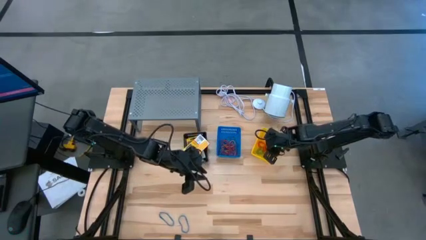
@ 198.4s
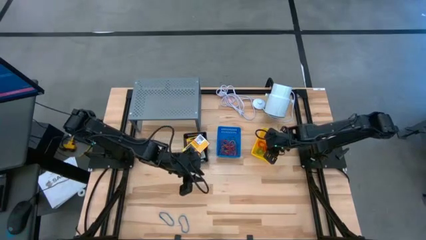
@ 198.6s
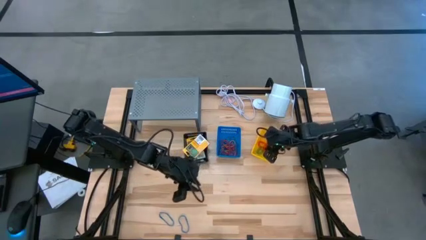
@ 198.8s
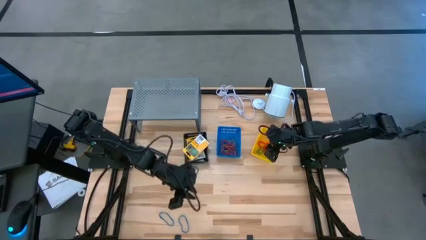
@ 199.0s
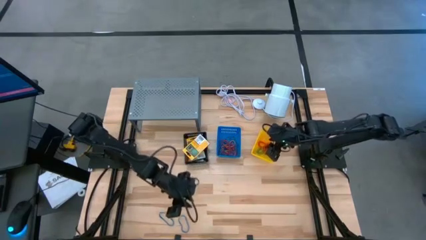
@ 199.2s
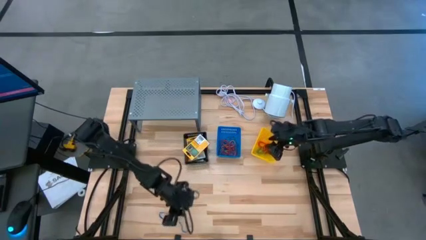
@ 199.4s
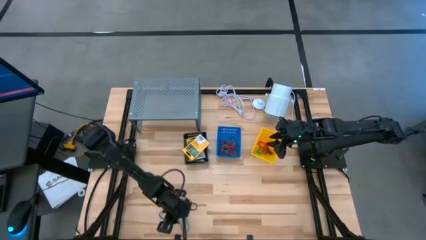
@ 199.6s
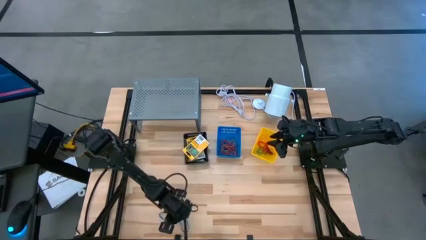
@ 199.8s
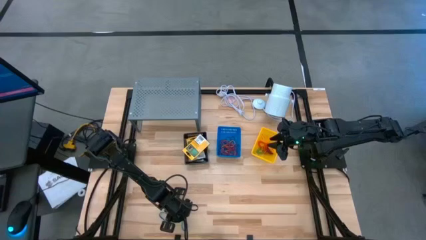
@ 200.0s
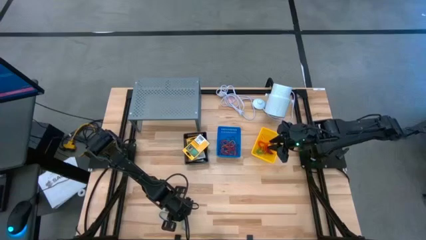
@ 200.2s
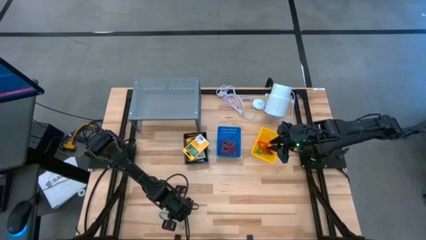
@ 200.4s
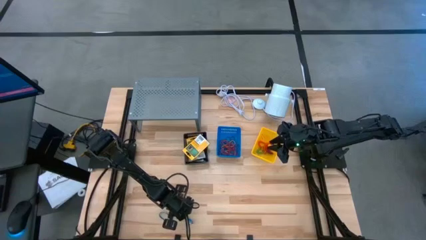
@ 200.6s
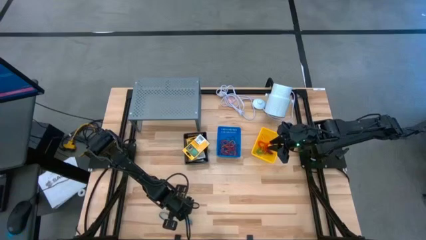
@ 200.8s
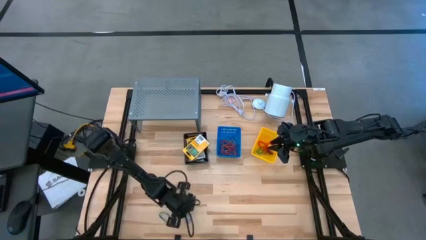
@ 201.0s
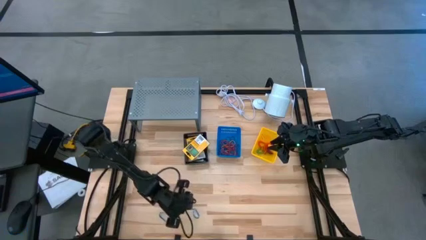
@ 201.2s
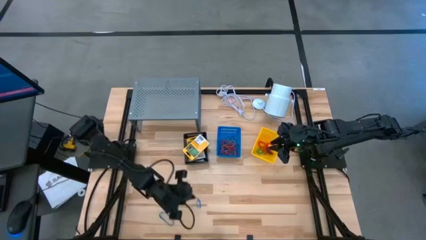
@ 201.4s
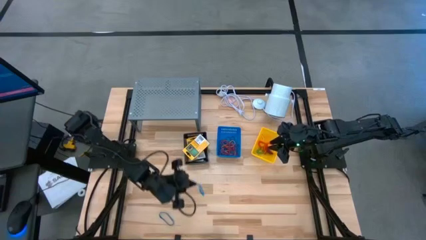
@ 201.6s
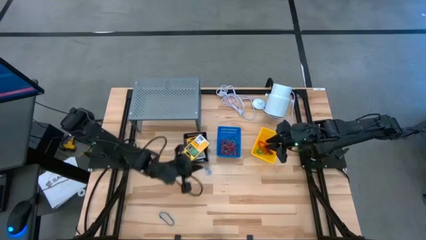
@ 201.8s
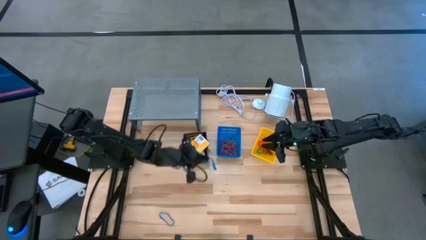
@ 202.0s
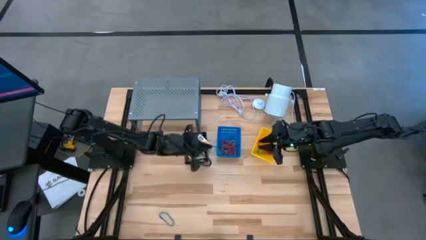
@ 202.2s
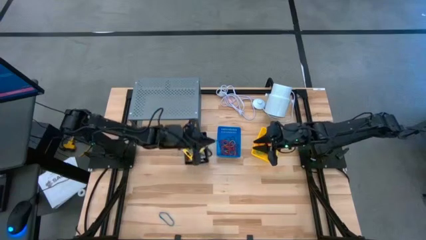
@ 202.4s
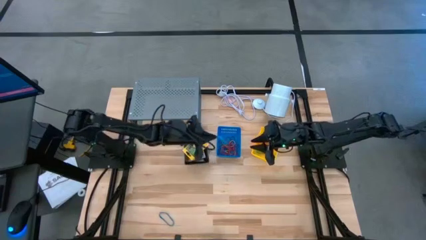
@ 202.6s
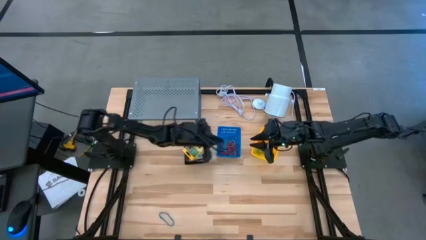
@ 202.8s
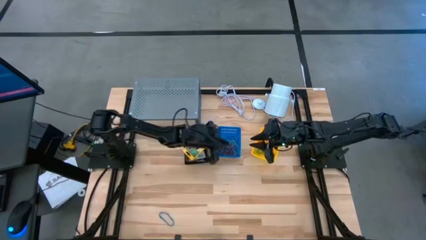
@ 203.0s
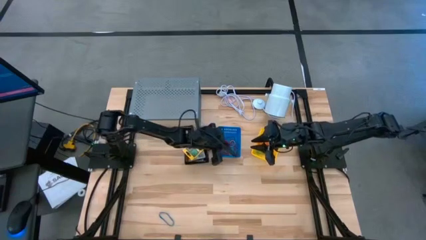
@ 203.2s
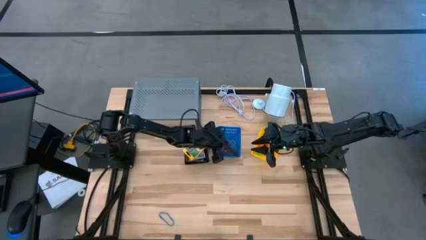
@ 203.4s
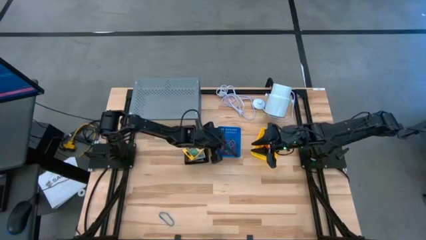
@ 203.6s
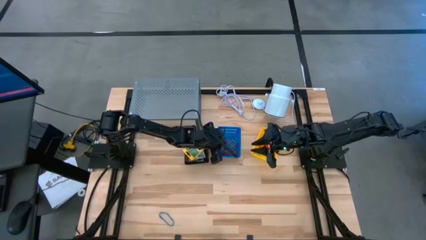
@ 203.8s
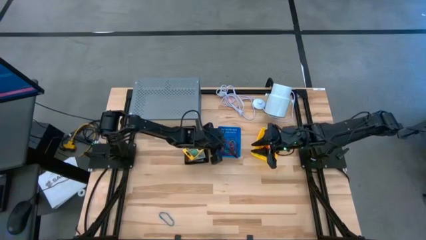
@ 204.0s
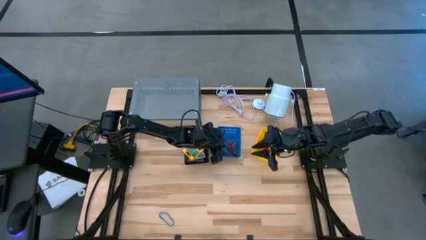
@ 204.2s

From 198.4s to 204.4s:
Task: Pick & Place Office Desk Supplies
Put the blue rubber band into the blue basket

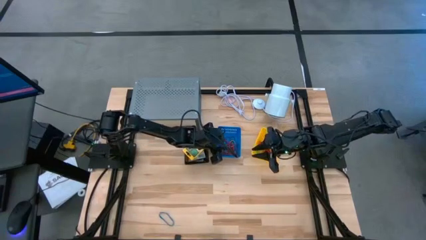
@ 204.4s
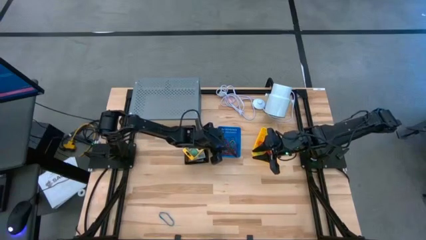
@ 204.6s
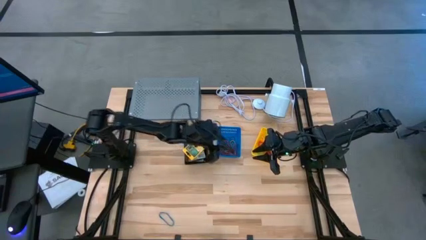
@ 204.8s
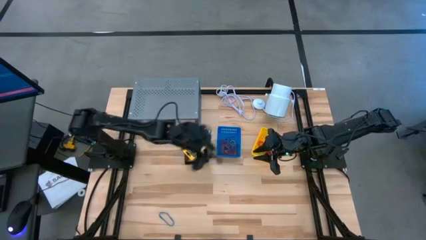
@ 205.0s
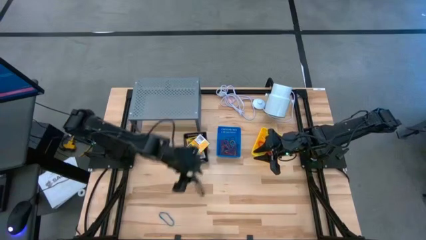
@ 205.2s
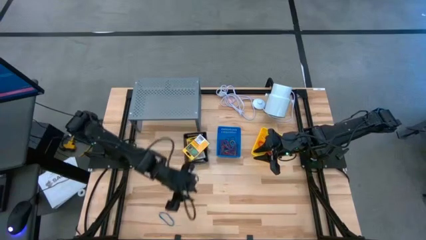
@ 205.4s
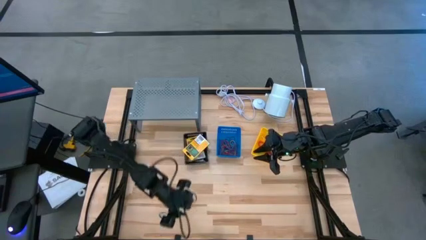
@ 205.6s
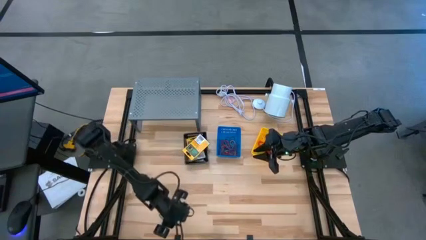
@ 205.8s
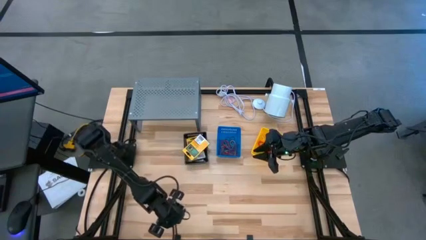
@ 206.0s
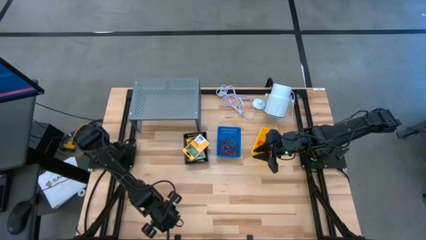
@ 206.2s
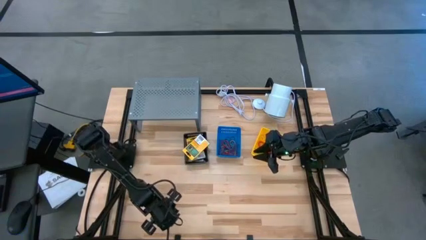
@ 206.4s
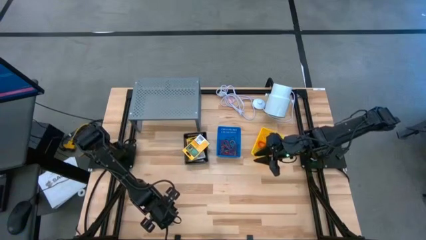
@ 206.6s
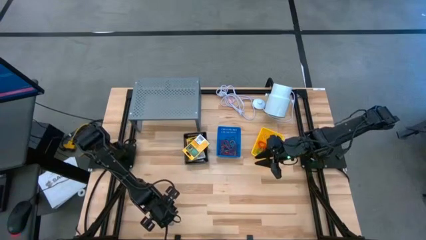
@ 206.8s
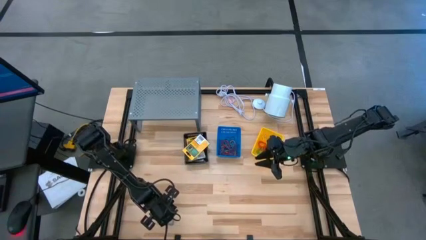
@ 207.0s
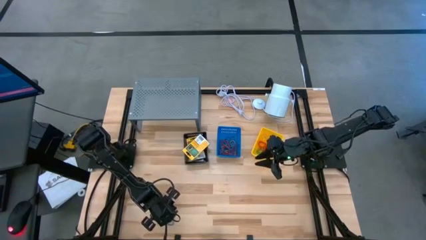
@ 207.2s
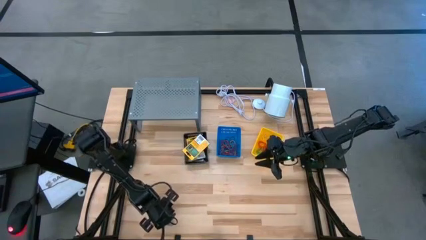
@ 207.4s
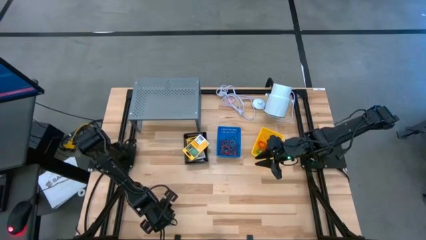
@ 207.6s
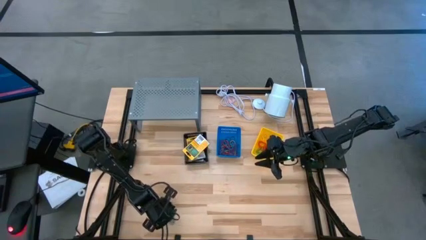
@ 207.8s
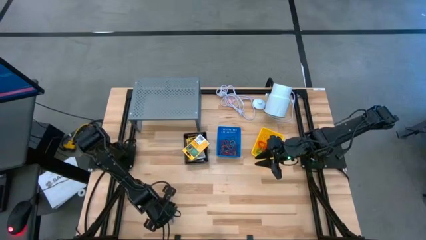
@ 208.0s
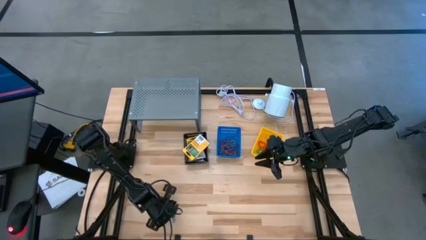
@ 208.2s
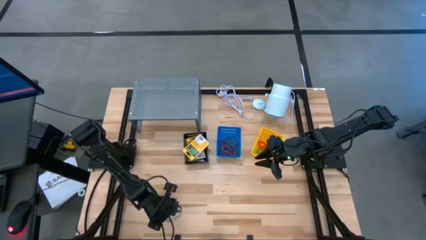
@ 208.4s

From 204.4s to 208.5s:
Put the blue rubber band into the blue basket

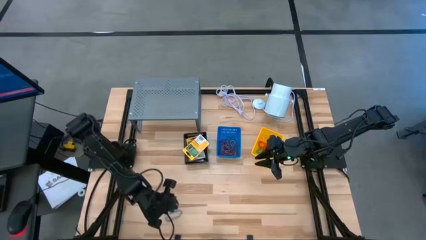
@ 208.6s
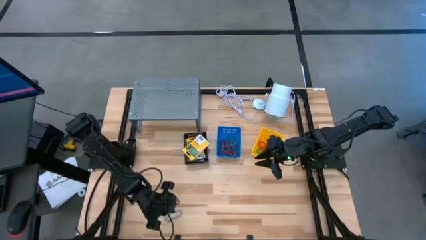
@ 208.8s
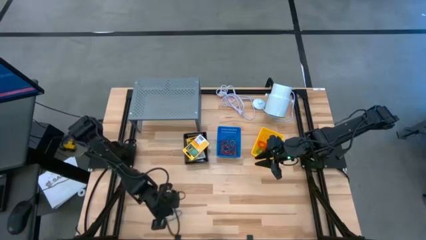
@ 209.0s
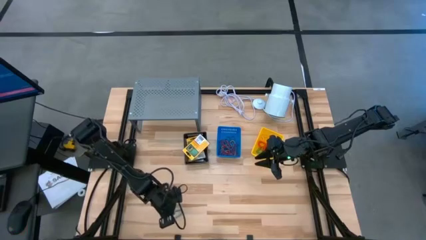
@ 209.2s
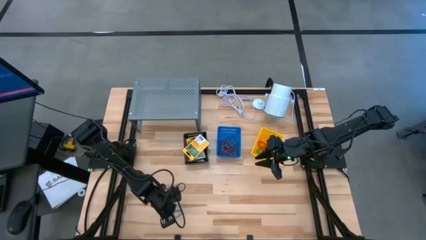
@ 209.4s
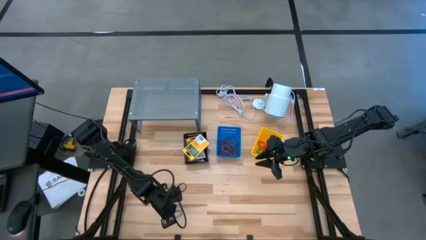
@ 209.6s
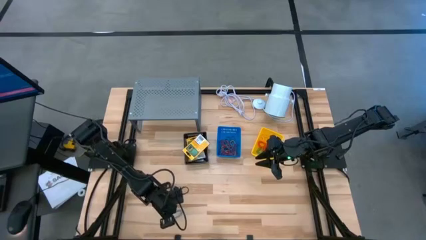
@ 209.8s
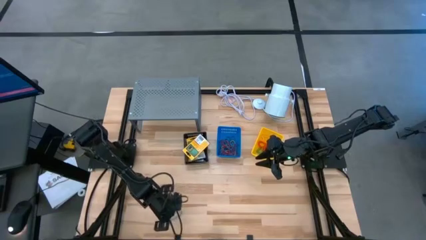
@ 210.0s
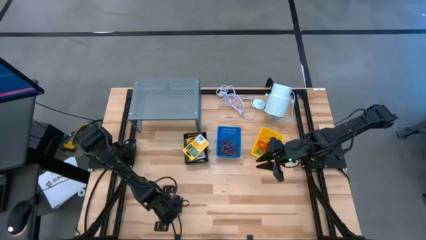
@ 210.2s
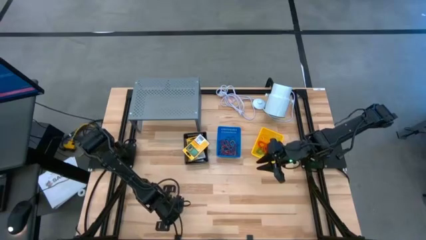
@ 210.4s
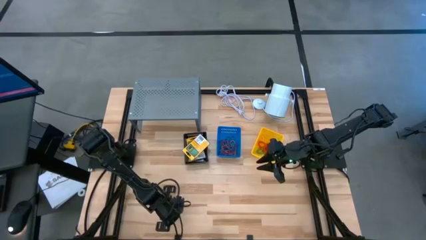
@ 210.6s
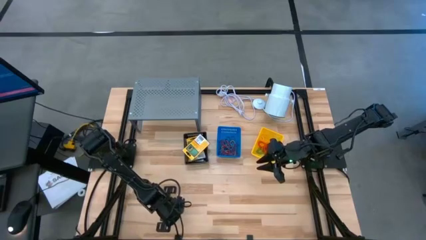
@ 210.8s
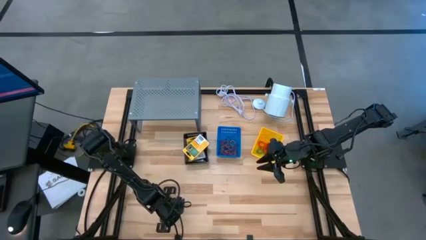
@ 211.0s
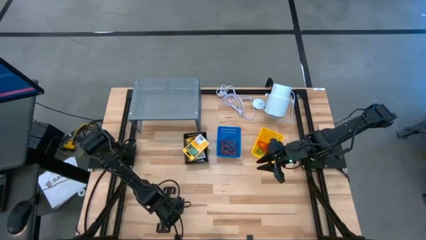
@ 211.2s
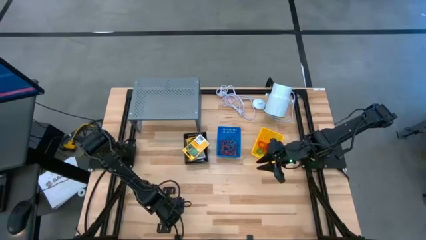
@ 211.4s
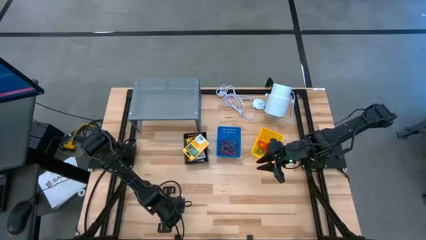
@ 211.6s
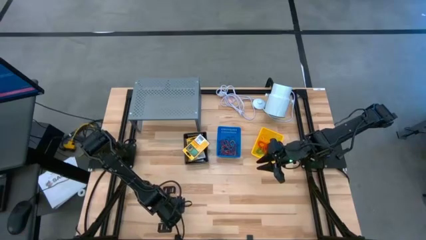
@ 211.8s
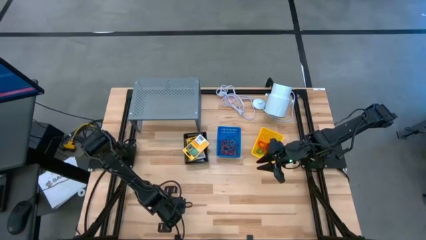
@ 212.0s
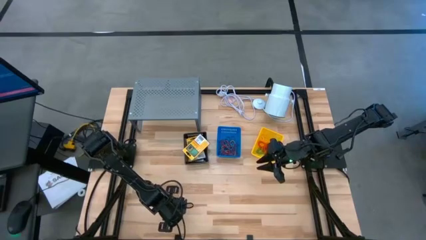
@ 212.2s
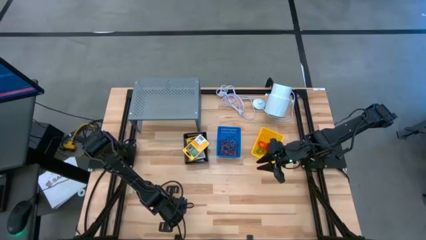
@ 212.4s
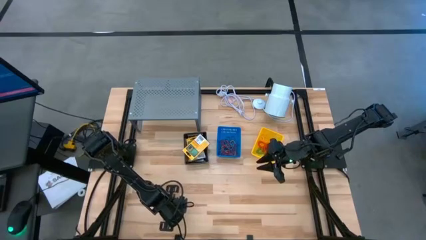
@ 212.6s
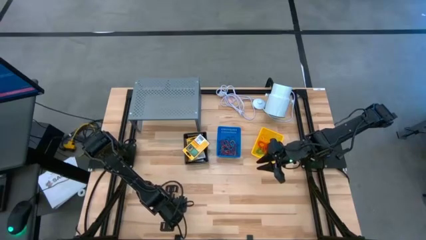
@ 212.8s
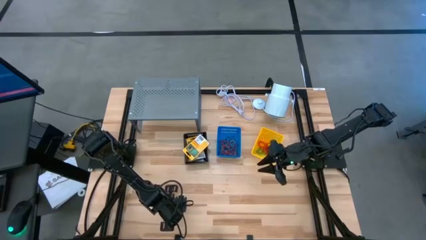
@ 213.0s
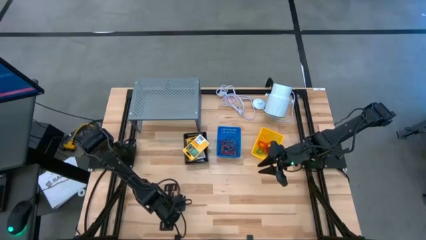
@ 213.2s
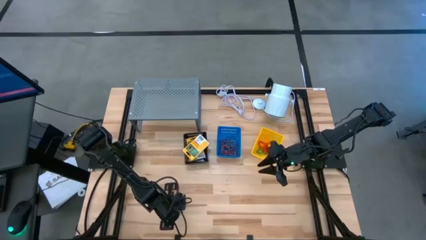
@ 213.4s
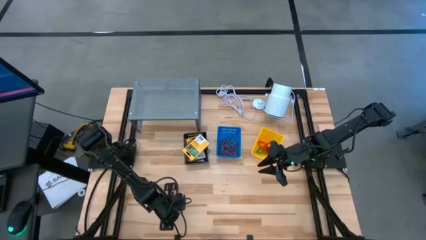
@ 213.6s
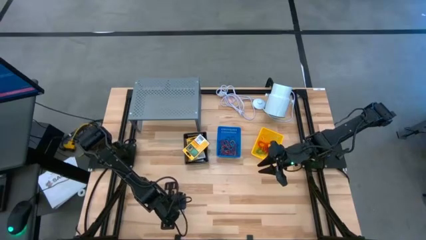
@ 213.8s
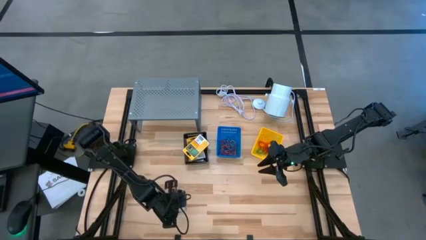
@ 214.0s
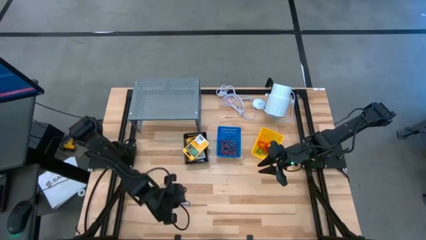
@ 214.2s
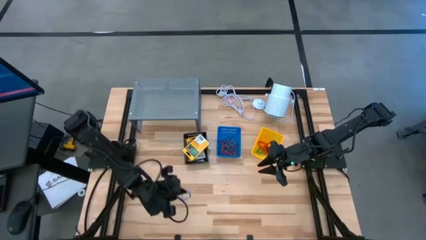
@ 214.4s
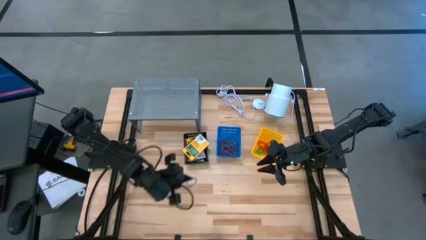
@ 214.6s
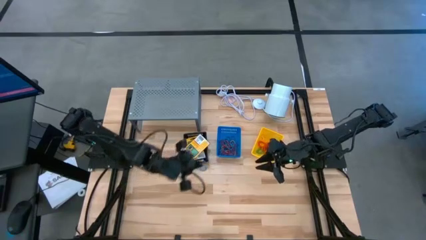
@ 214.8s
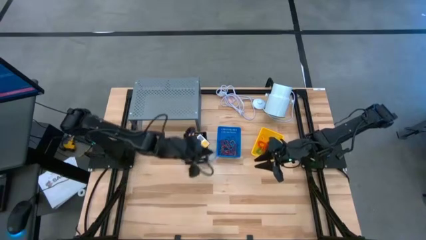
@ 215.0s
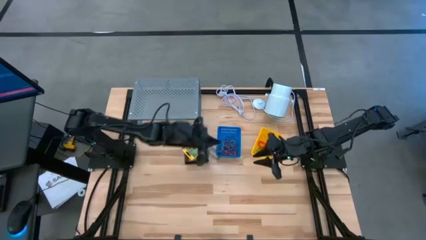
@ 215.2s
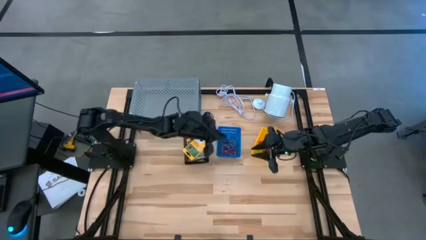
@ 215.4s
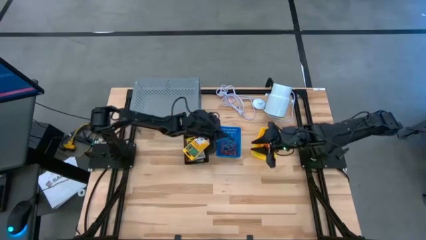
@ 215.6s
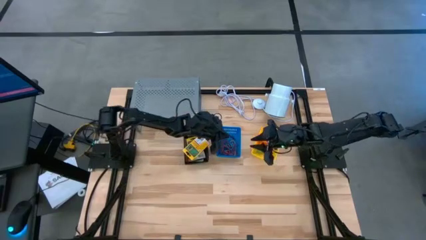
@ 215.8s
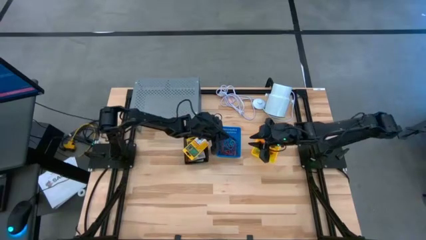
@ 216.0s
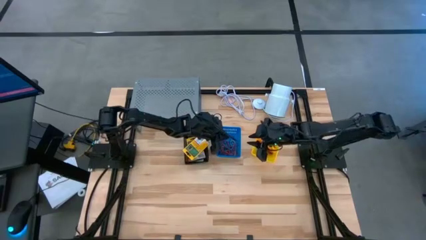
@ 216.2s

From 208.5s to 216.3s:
Put the blue rubber band into the blue basket
